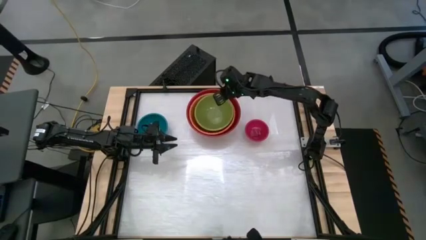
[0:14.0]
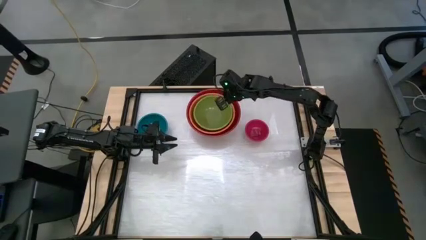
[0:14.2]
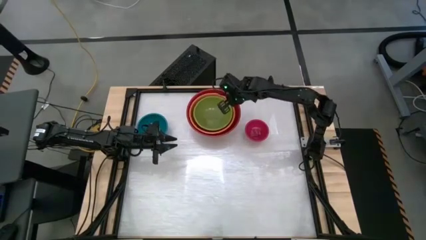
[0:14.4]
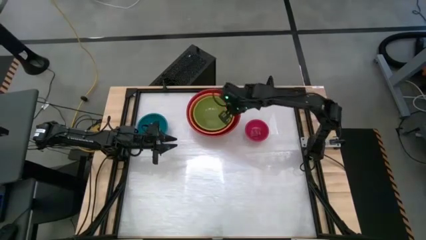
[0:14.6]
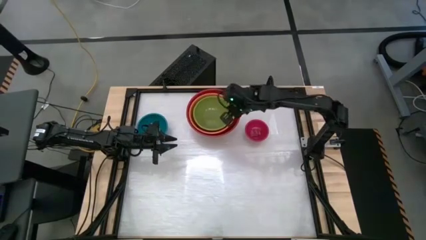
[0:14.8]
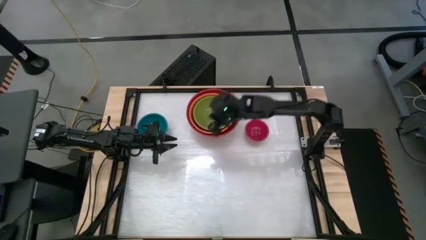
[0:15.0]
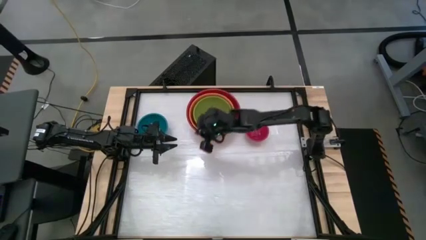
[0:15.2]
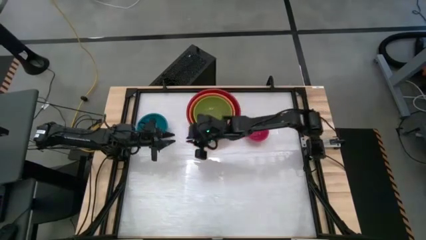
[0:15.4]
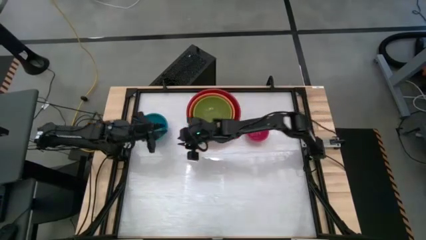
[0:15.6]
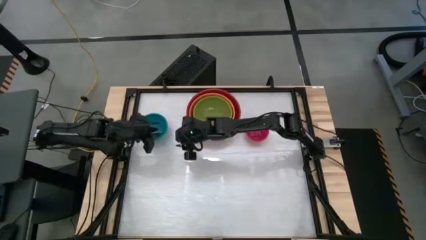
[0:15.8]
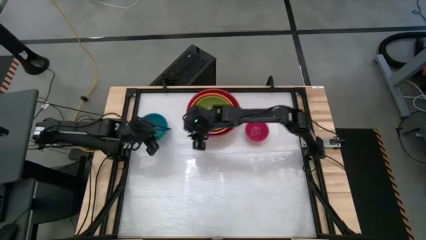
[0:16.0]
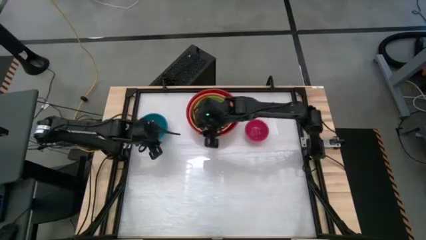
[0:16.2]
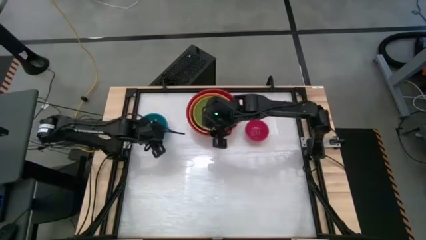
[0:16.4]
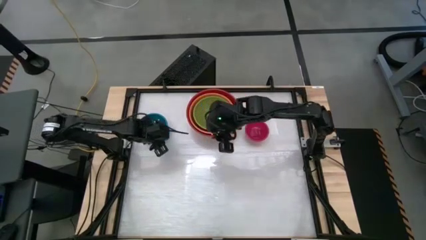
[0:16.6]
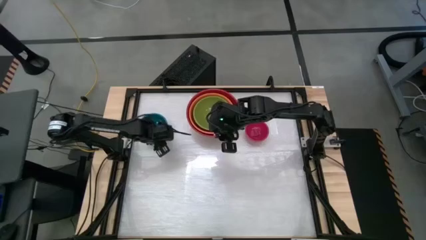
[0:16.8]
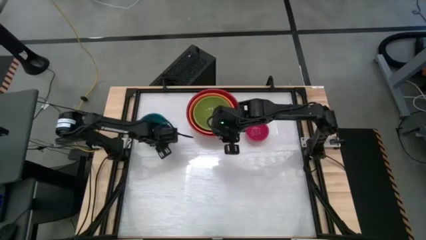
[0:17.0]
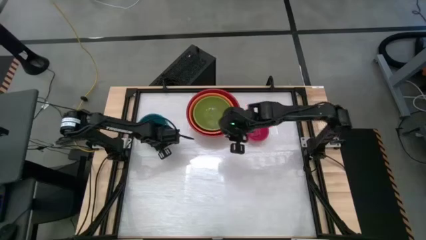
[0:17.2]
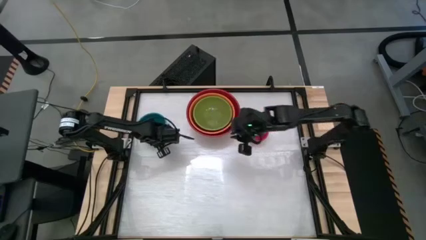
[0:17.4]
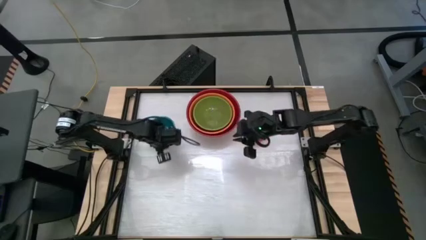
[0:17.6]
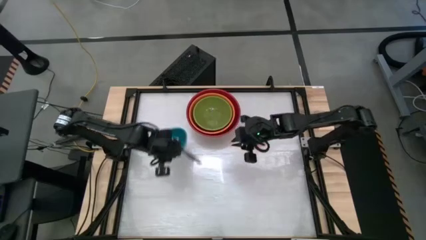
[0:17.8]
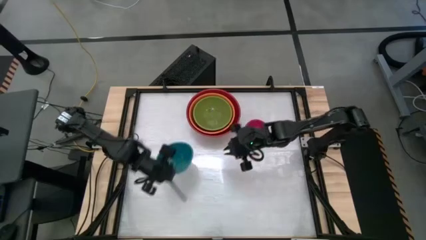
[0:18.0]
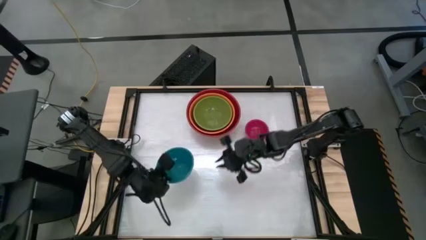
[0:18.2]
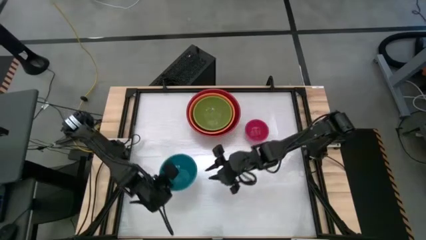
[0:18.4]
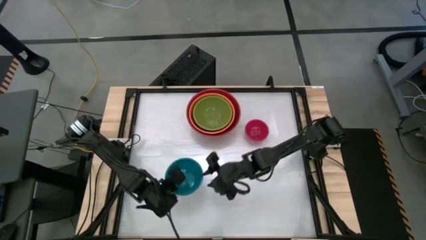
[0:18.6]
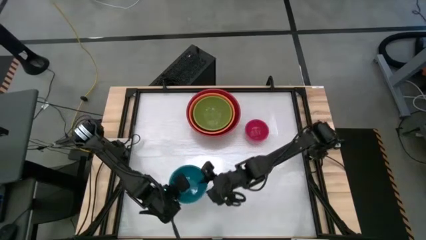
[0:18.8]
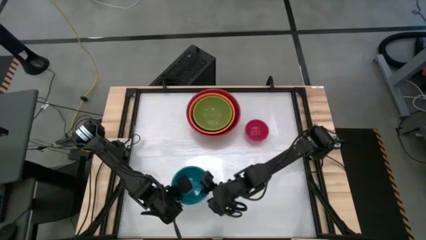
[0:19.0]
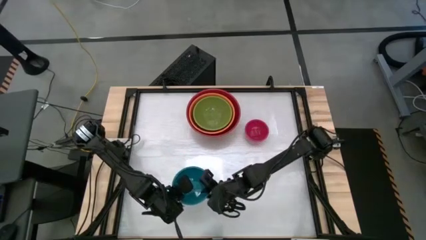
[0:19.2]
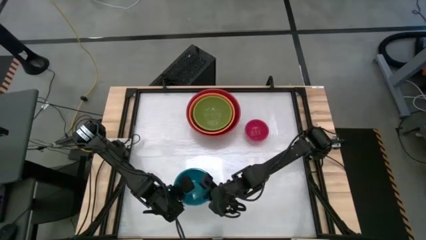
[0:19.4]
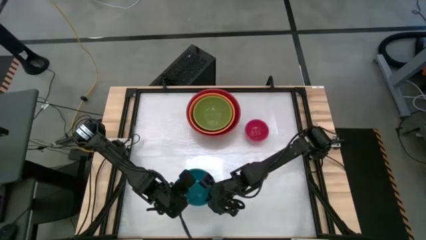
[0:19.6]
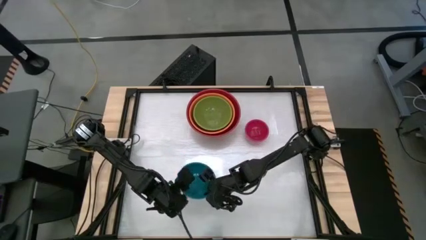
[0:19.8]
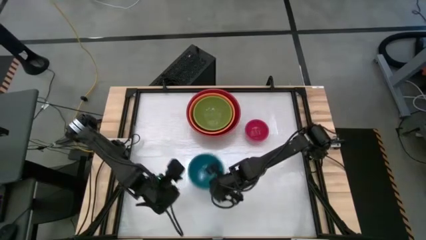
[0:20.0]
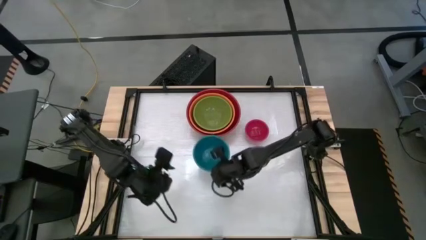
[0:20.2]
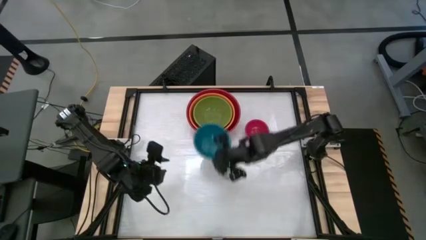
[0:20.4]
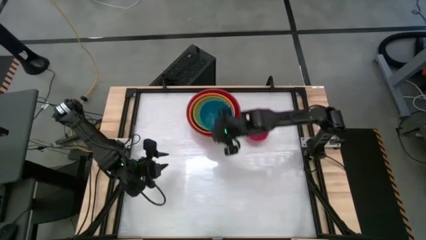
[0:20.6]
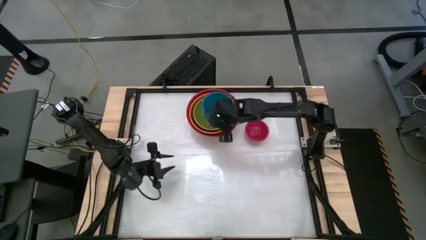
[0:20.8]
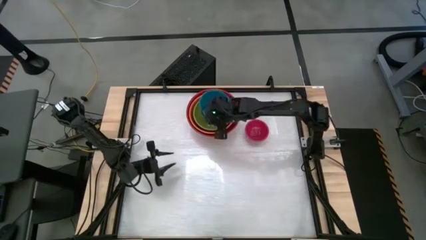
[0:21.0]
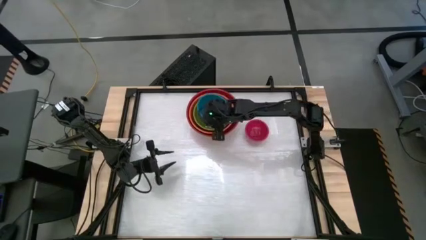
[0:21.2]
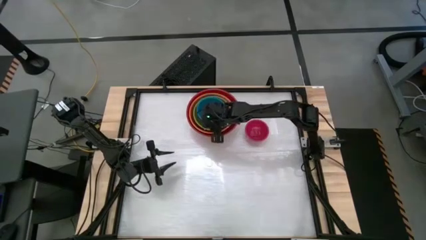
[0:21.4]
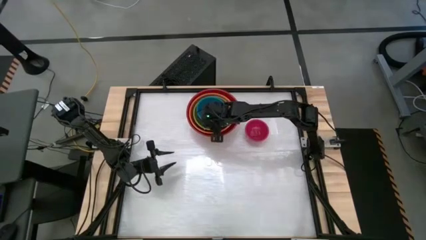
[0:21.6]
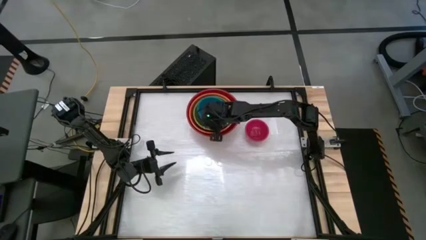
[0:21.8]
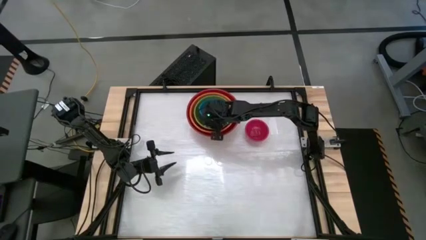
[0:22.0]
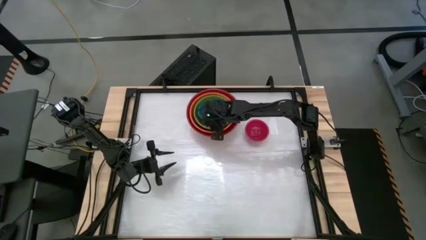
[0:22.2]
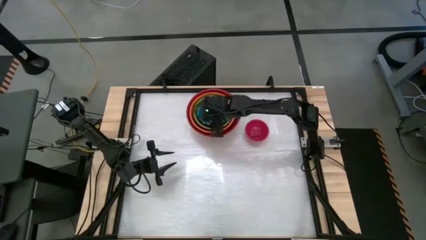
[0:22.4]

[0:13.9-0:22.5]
Stack the blue bowl on top of the green bowl

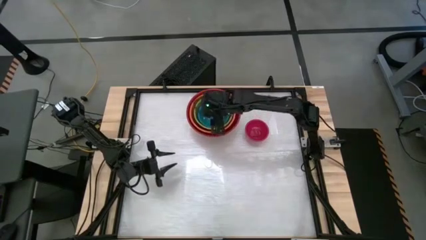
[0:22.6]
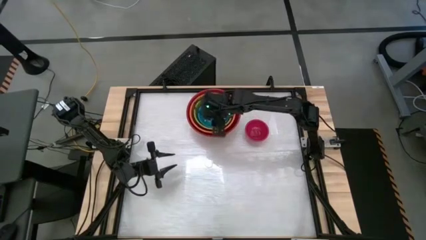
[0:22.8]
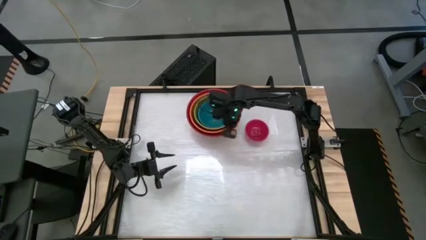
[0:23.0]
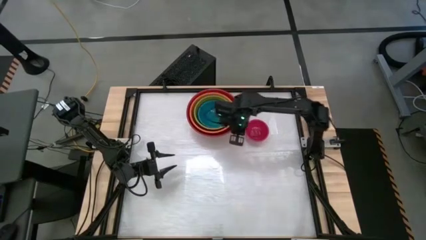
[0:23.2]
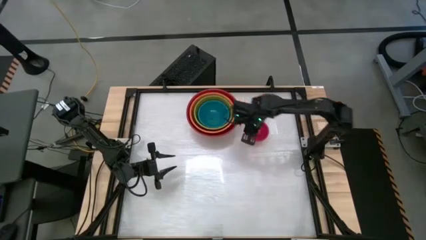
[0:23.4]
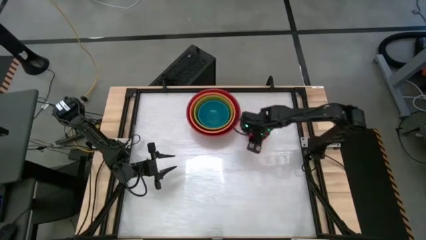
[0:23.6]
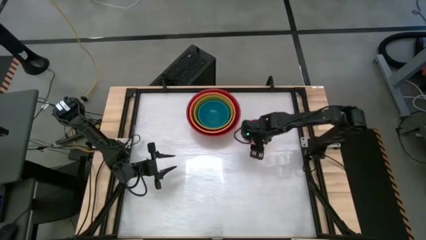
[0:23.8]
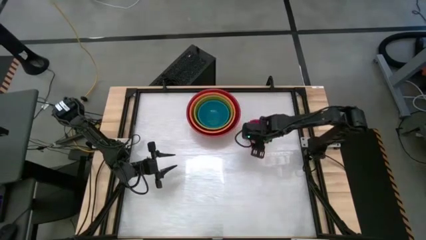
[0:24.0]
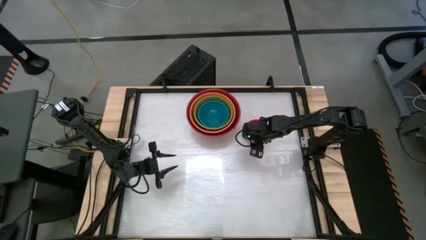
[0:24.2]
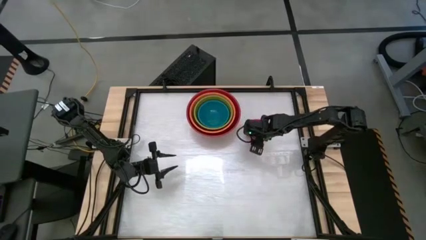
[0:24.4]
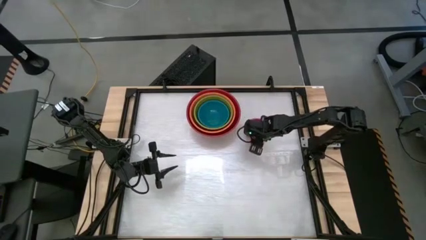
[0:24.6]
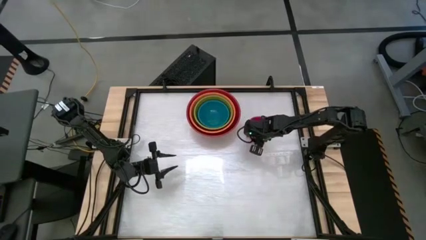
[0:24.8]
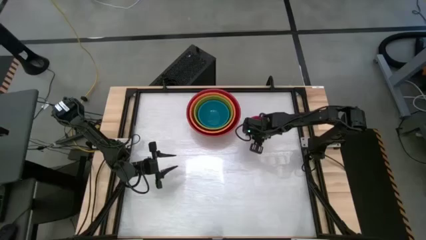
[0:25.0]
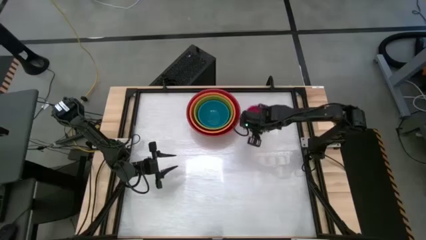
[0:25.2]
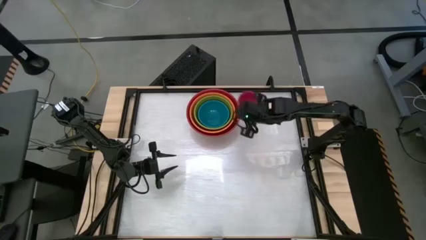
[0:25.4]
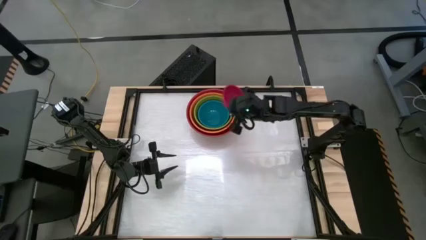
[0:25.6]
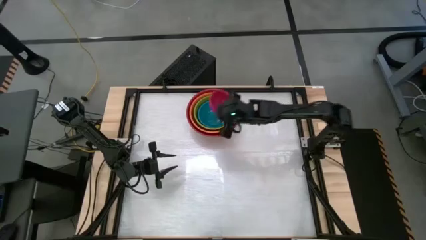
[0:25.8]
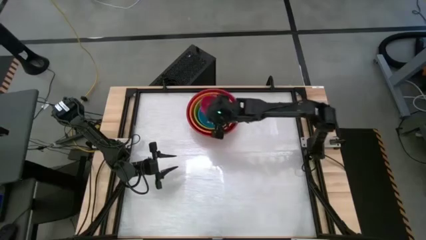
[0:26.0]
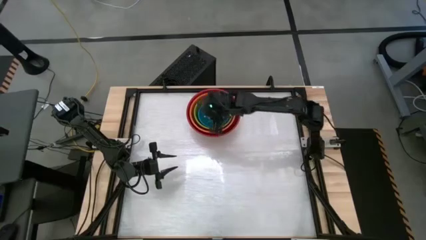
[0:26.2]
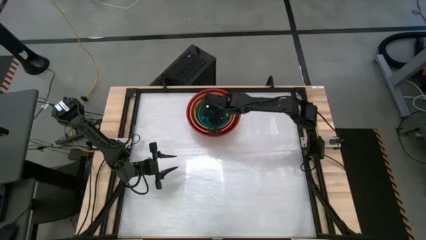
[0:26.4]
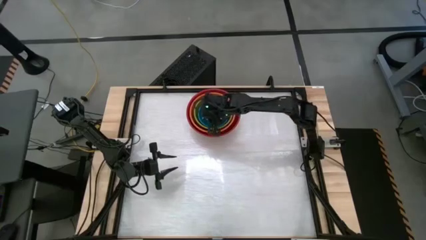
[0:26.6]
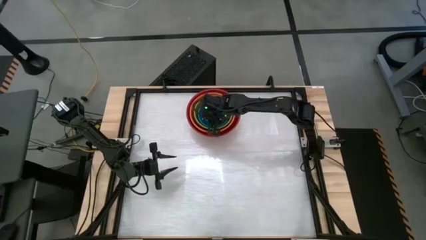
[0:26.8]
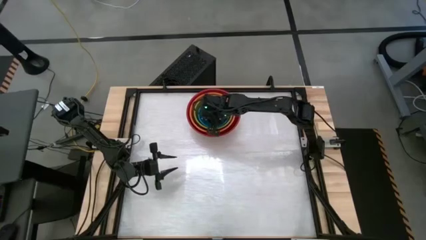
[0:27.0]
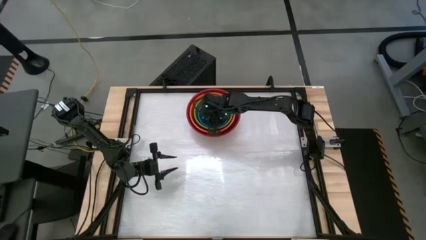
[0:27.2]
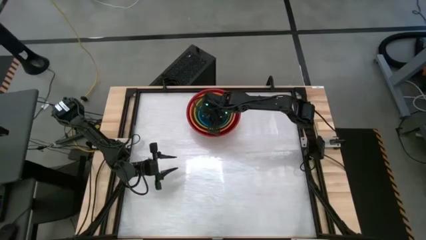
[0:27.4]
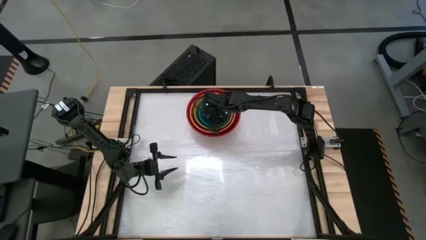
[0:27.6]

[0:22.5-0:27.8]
Stack the pink bowl on top of the blue bowl
